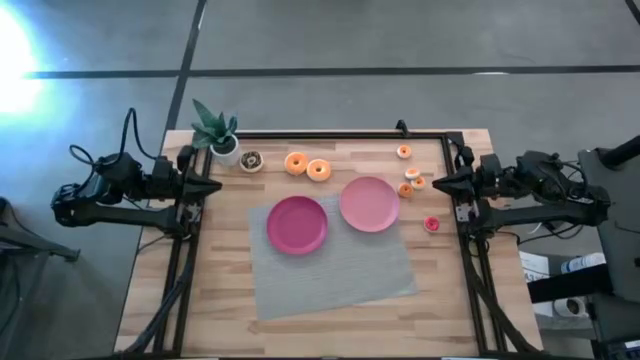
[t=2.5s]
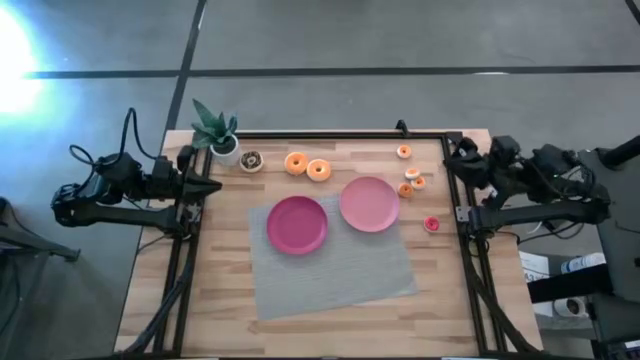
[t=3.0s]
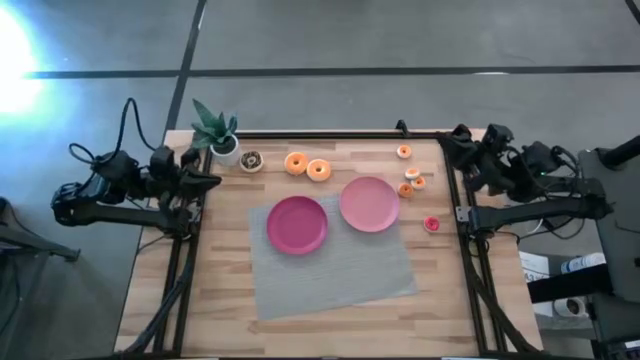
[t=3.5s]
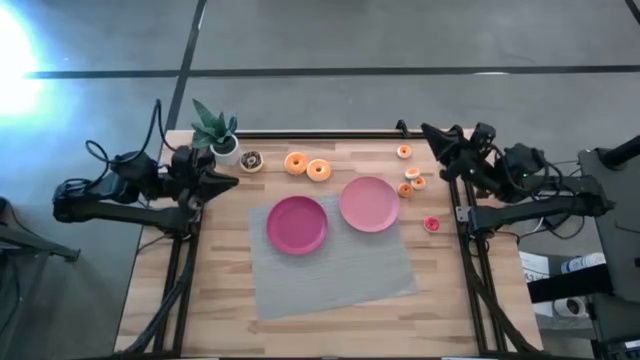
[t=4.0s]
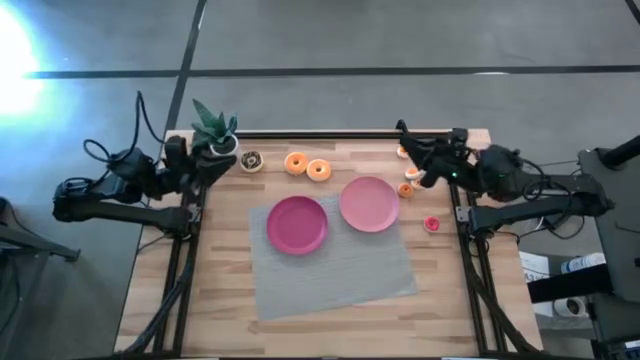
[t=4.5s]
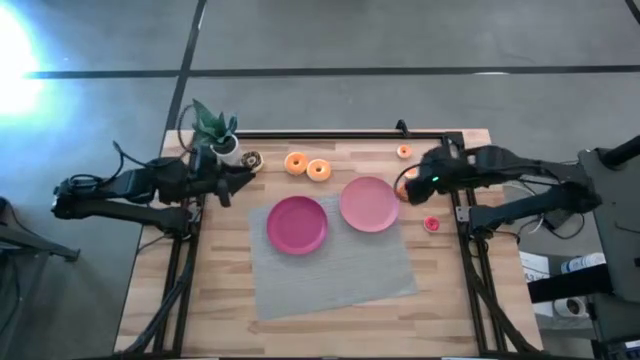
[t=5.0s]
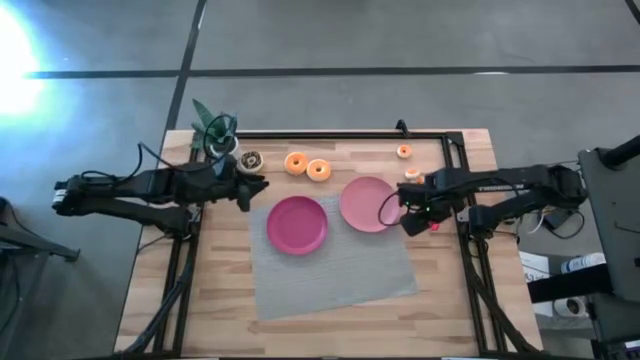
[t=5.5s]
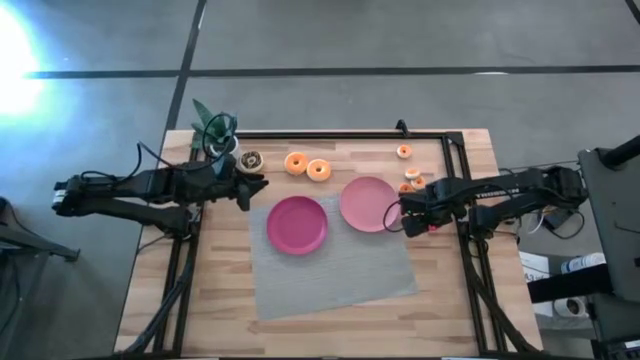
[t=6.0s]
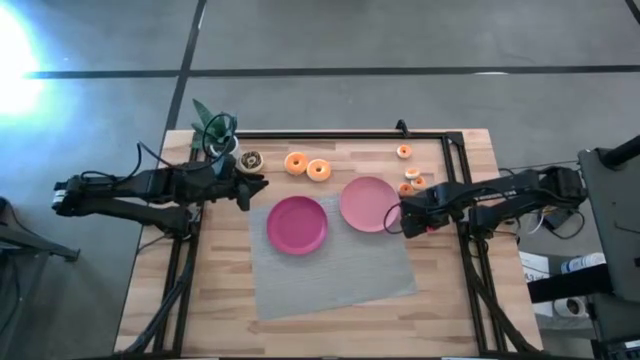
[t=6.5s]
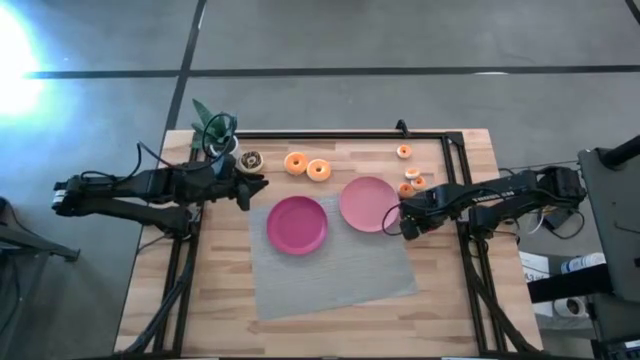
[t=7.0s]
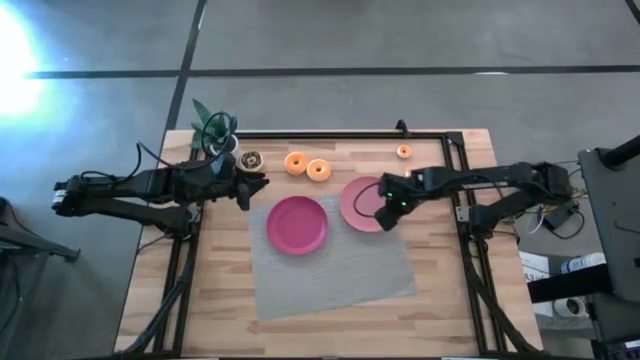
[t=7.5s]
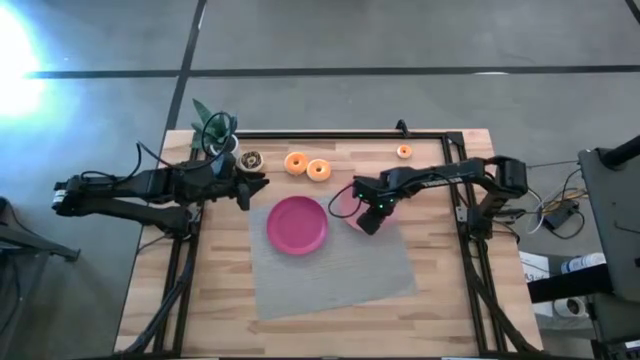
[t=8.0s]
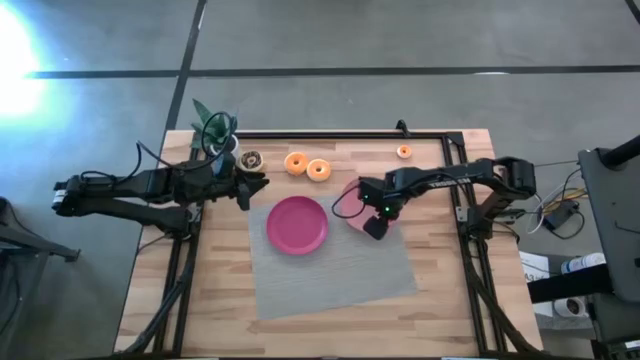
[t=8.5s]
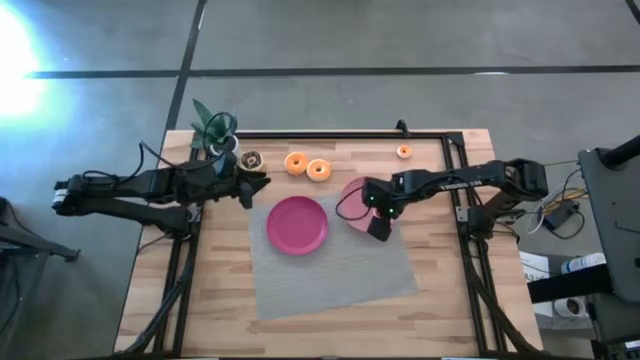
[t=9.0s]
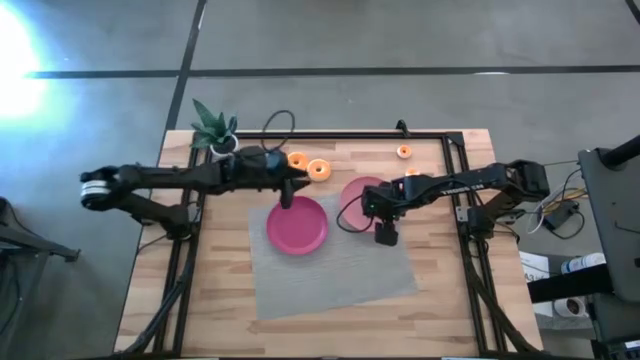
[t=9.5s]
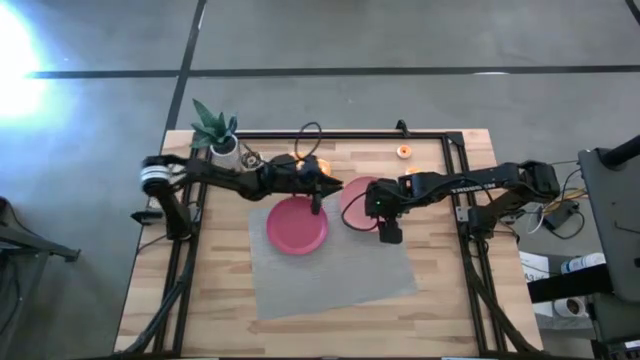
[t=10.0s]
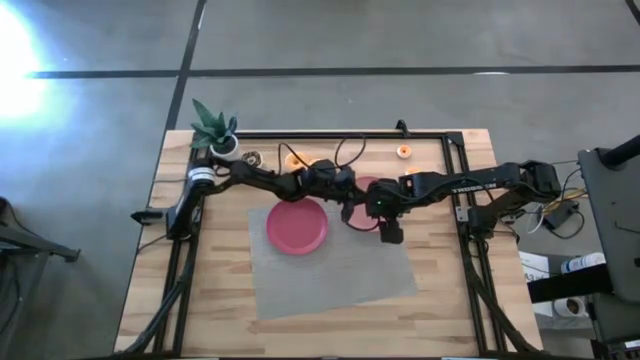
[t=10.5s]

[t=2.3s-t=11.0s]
Task: Pick & Place donuts
Put the small red donut on the light pink plate

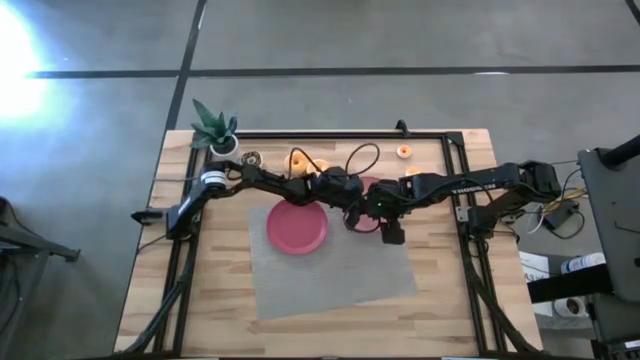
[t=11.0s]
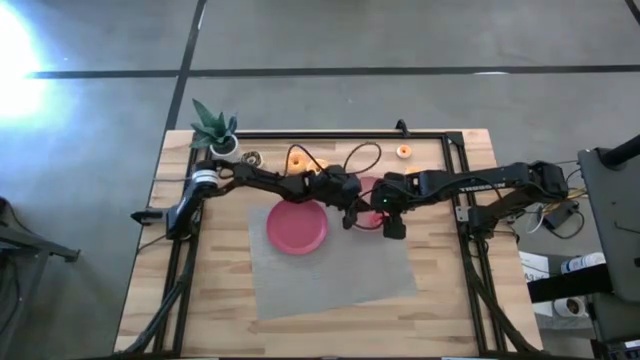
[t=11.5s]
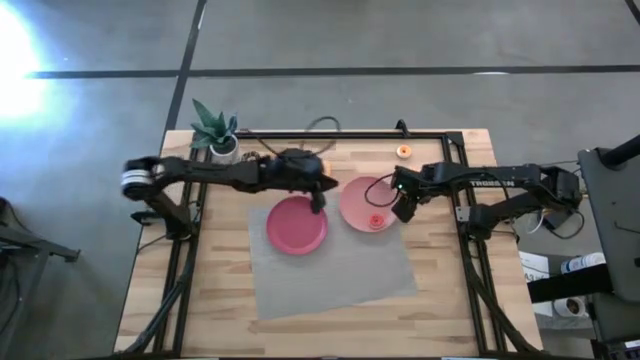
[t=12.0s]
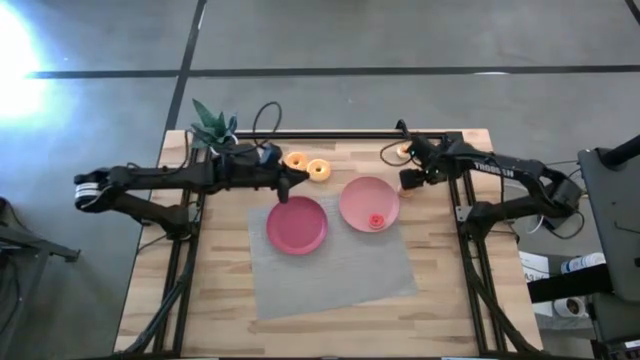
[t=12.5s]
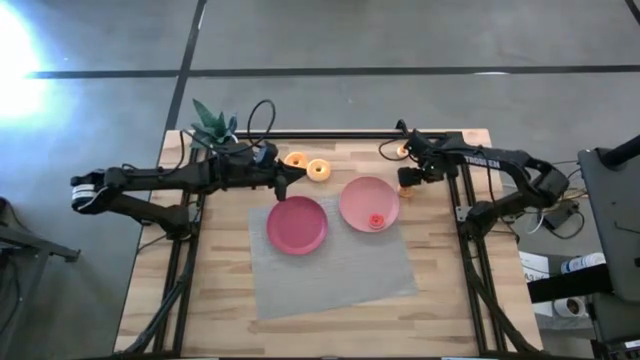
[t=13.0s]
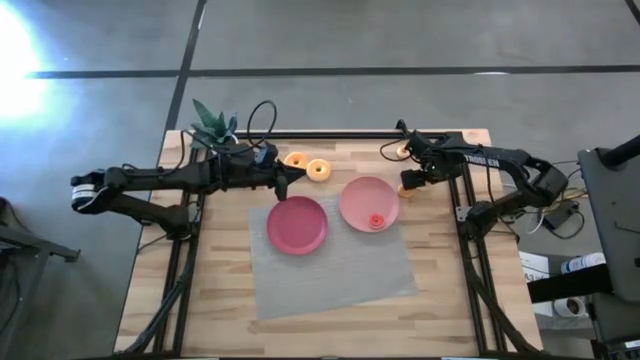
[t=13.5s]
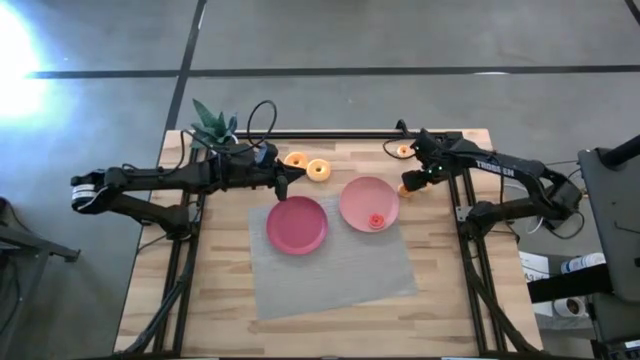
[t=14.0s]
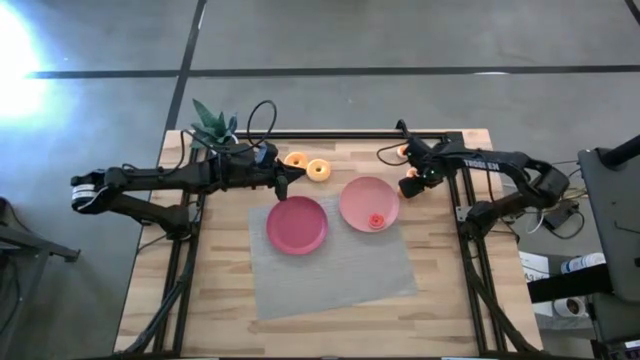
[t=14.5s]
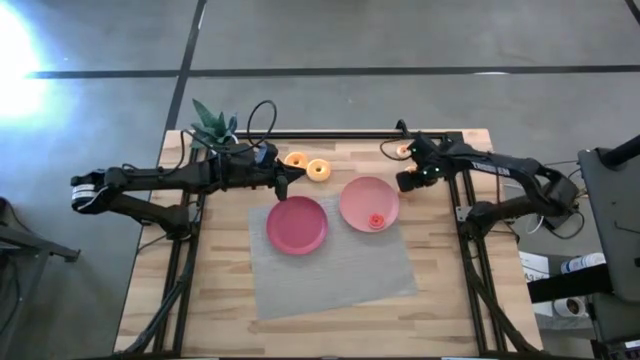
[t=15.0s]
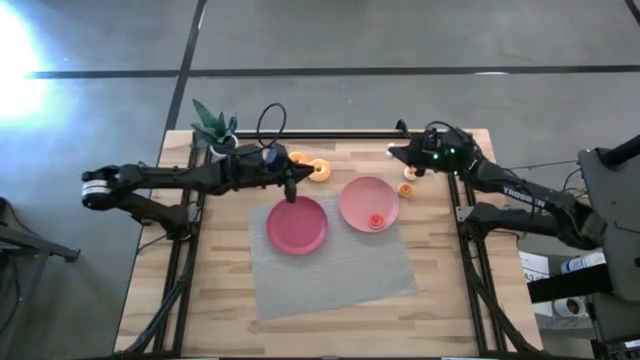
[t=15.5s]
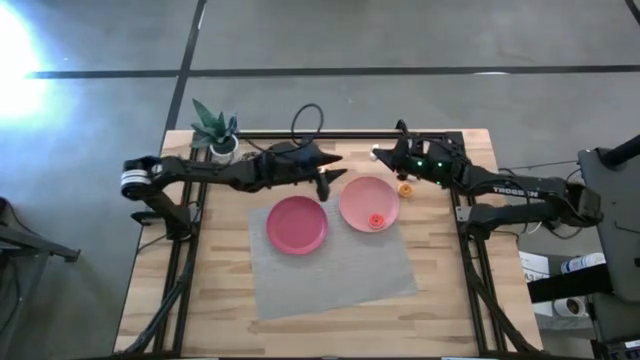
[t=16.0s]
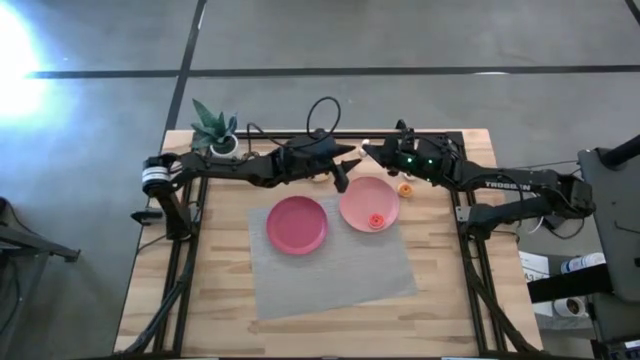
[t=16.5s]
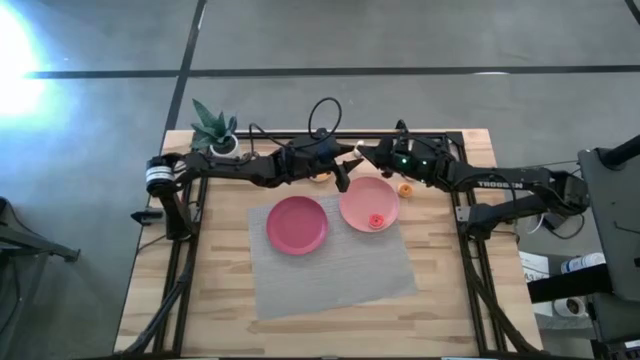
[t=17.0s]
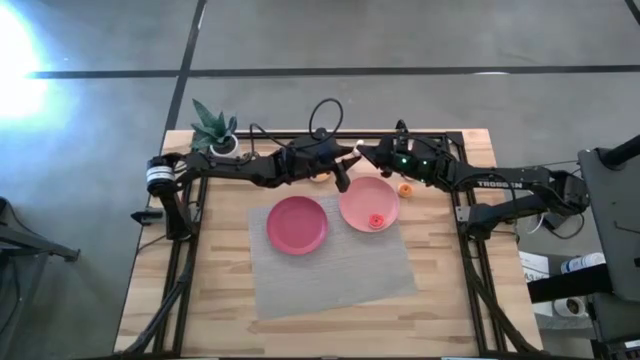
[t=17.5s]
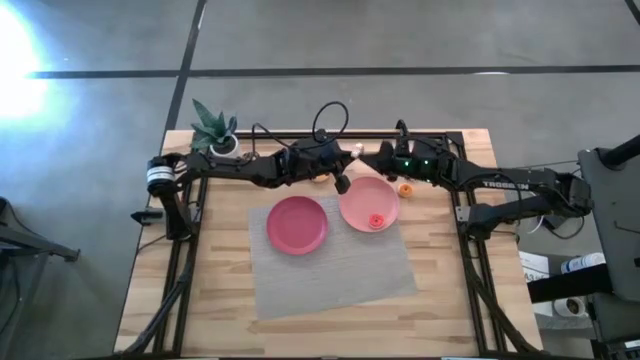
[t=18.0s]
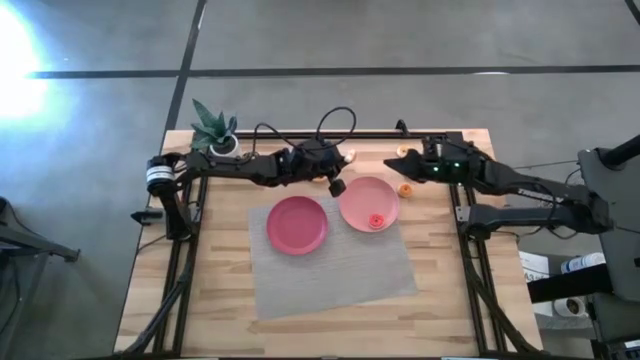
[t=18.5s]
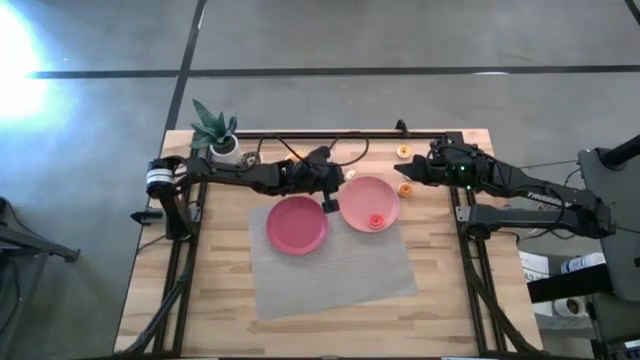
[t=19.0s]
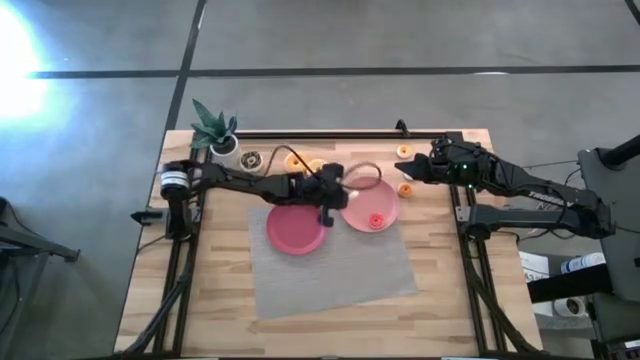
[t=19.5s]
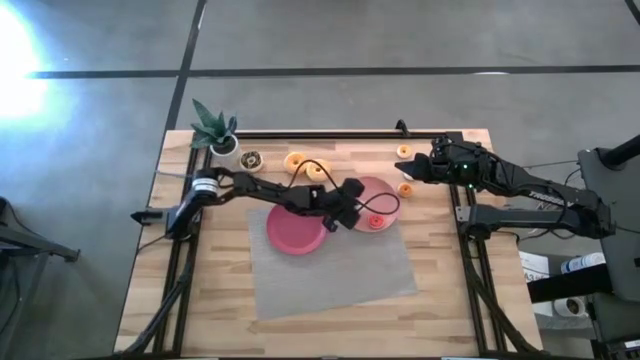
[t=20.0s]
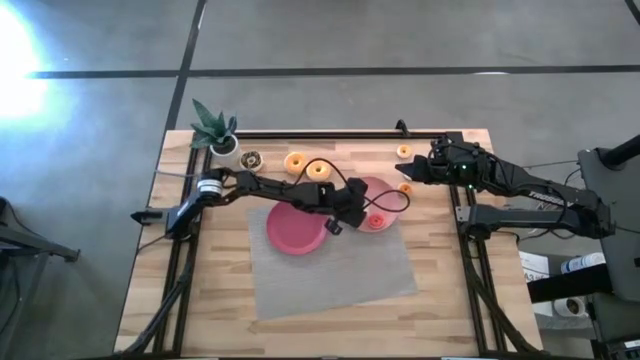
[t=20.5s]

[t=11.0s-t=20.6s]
Put the small white donut on the light pink plate
